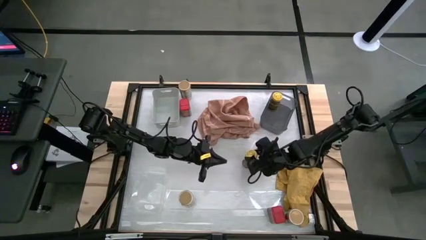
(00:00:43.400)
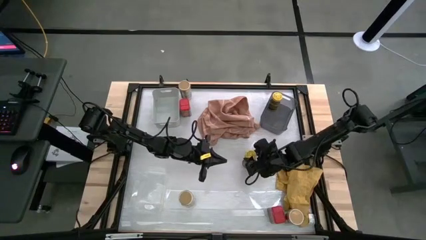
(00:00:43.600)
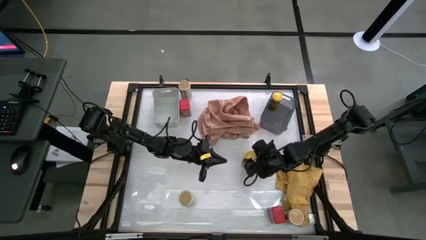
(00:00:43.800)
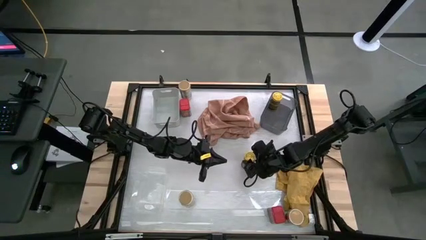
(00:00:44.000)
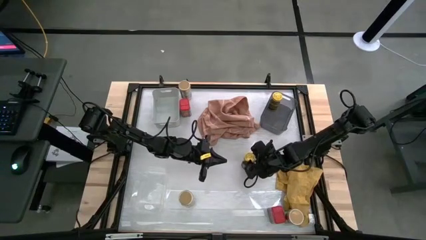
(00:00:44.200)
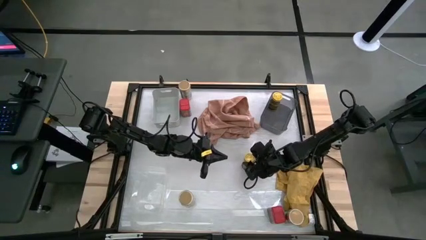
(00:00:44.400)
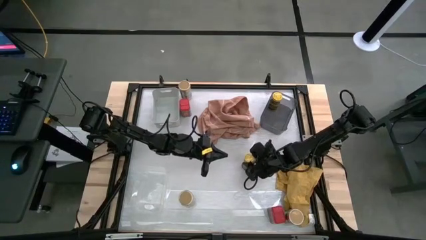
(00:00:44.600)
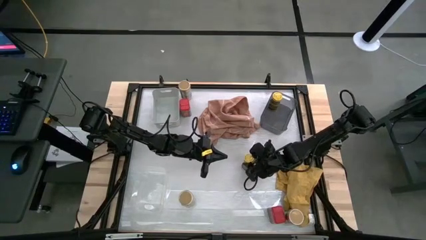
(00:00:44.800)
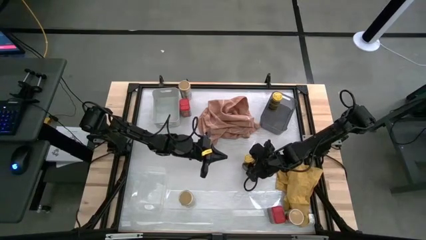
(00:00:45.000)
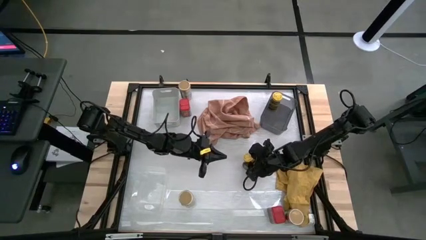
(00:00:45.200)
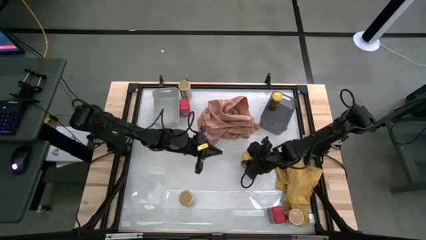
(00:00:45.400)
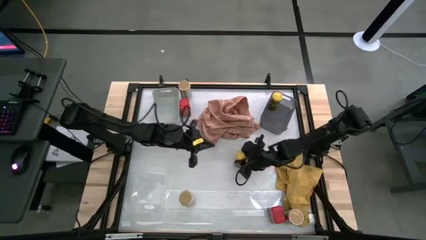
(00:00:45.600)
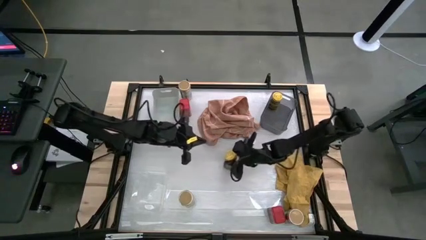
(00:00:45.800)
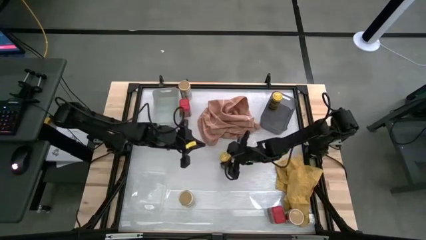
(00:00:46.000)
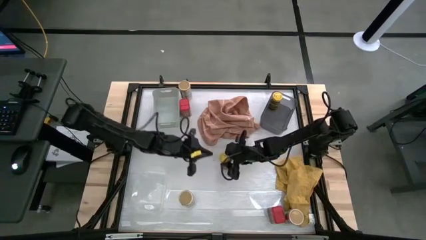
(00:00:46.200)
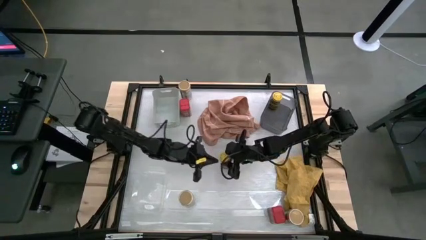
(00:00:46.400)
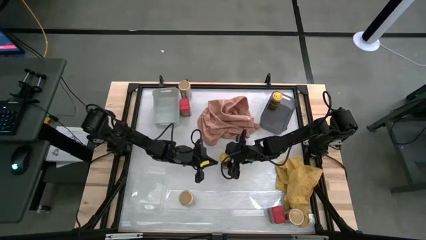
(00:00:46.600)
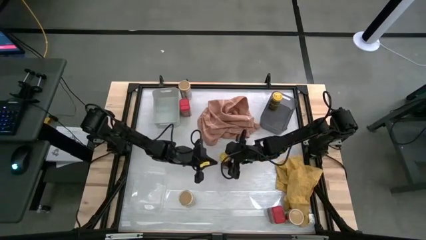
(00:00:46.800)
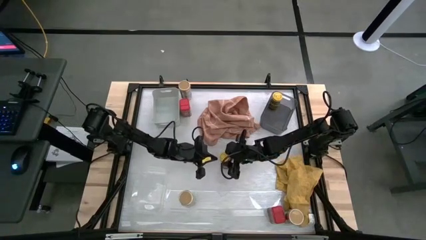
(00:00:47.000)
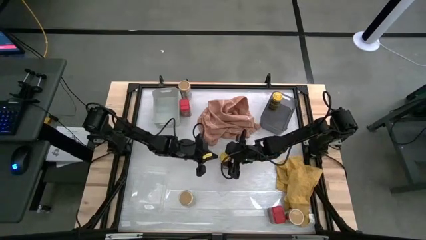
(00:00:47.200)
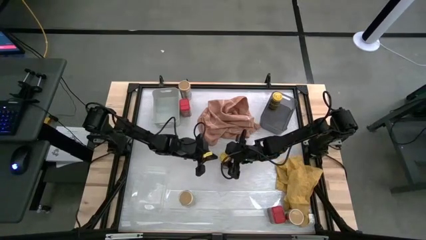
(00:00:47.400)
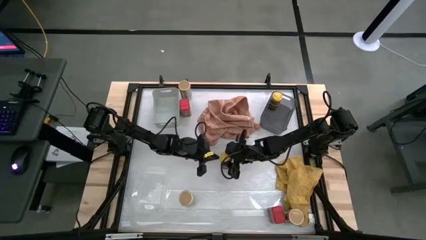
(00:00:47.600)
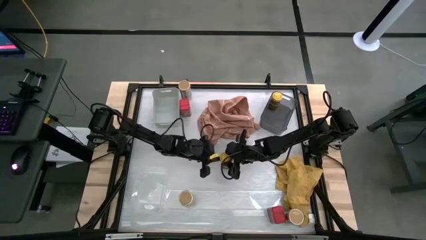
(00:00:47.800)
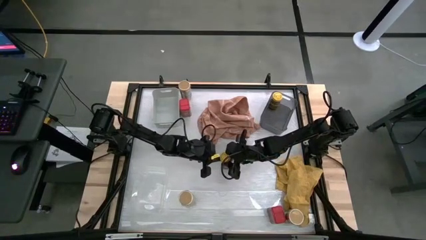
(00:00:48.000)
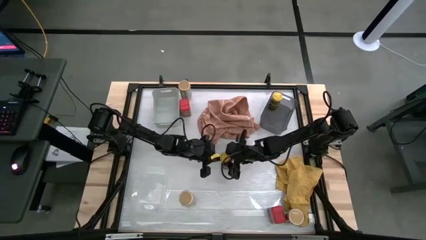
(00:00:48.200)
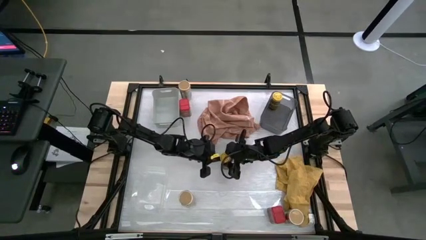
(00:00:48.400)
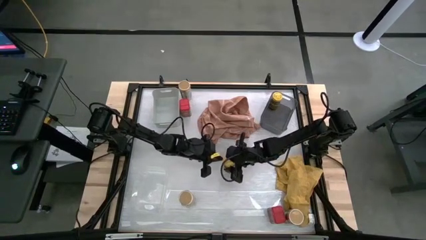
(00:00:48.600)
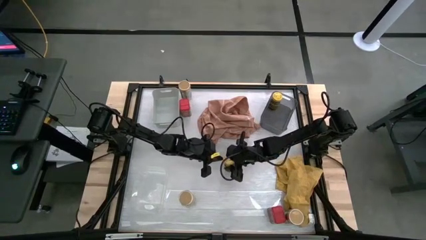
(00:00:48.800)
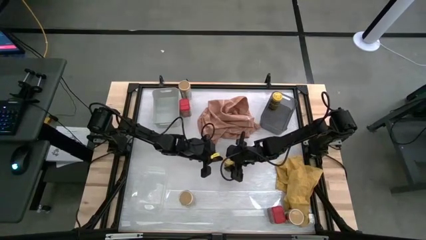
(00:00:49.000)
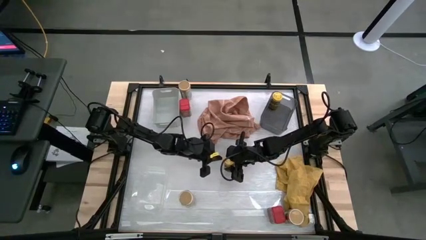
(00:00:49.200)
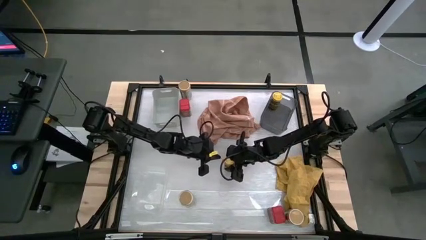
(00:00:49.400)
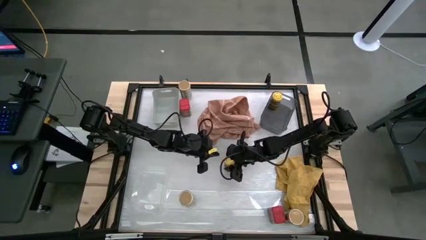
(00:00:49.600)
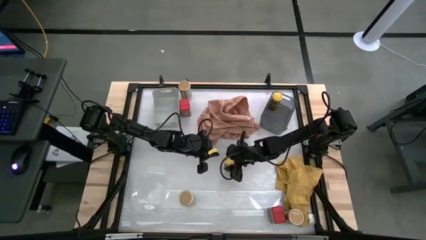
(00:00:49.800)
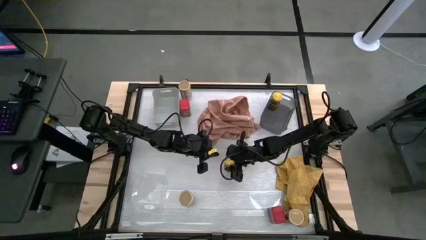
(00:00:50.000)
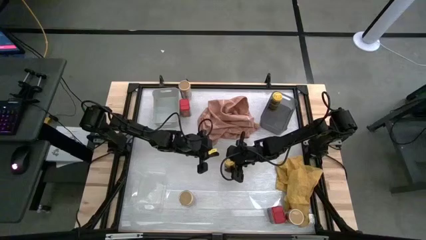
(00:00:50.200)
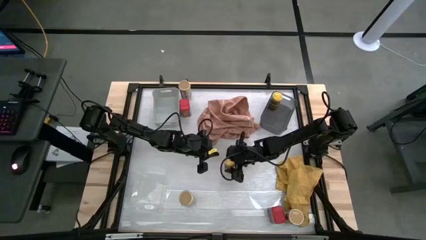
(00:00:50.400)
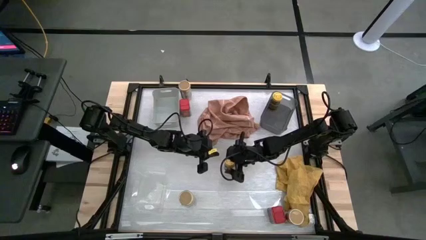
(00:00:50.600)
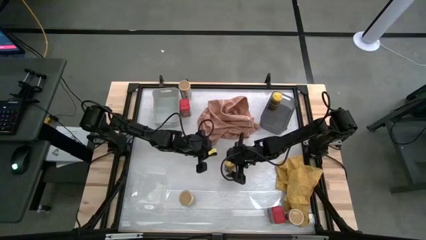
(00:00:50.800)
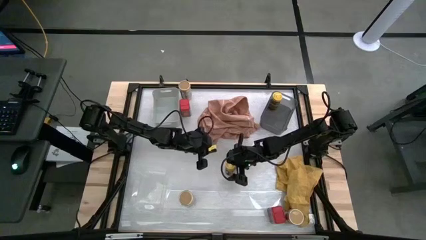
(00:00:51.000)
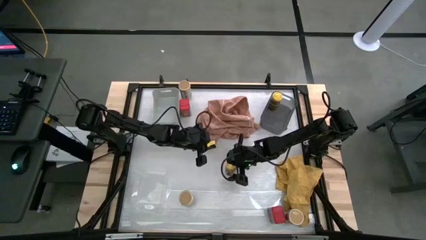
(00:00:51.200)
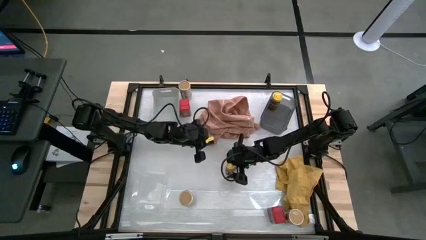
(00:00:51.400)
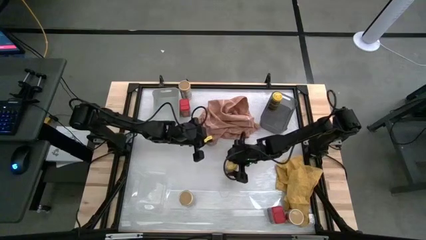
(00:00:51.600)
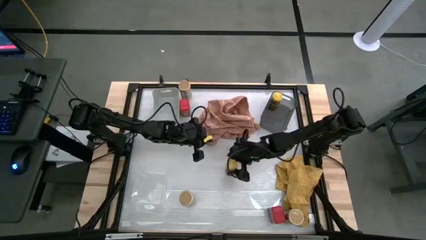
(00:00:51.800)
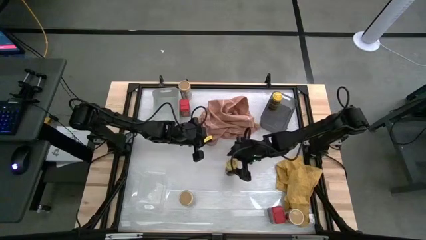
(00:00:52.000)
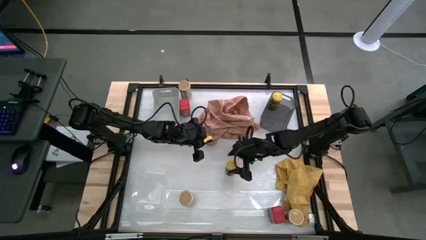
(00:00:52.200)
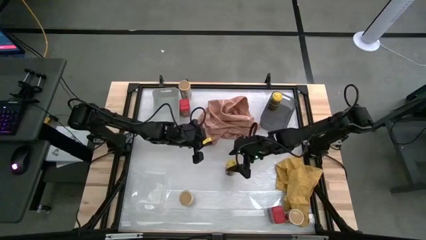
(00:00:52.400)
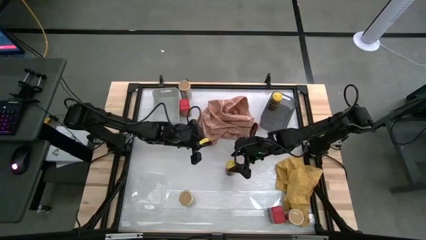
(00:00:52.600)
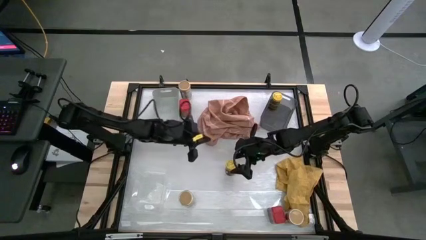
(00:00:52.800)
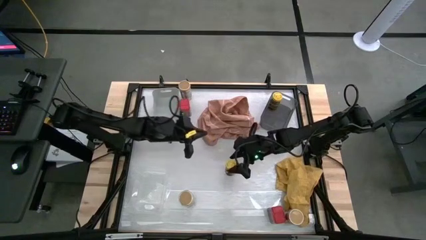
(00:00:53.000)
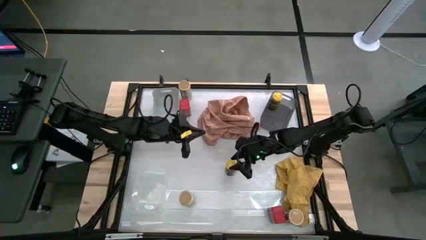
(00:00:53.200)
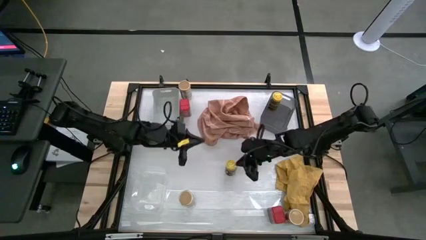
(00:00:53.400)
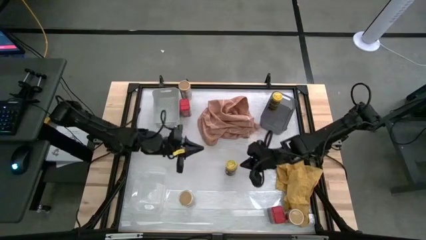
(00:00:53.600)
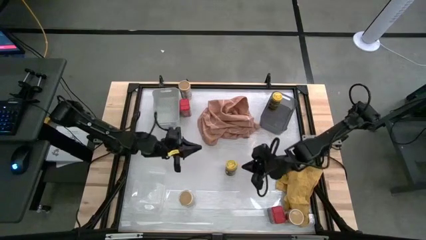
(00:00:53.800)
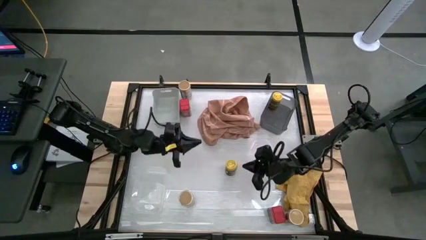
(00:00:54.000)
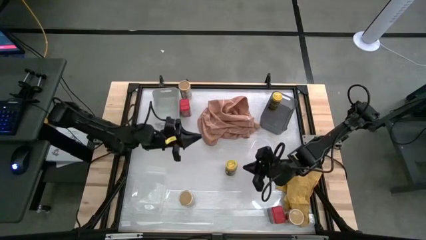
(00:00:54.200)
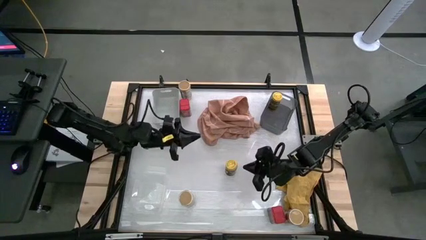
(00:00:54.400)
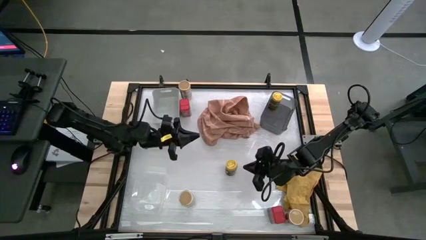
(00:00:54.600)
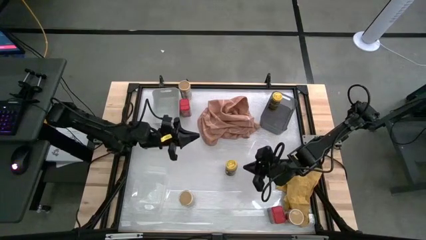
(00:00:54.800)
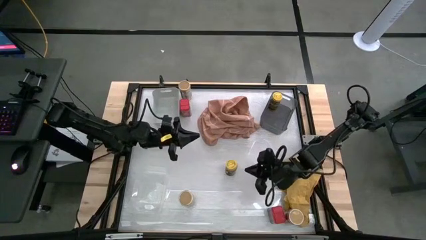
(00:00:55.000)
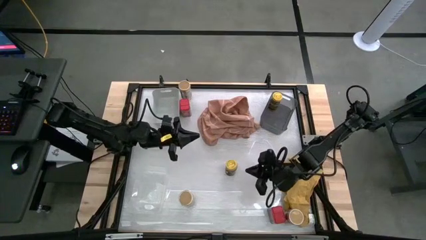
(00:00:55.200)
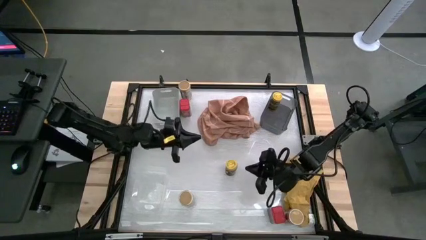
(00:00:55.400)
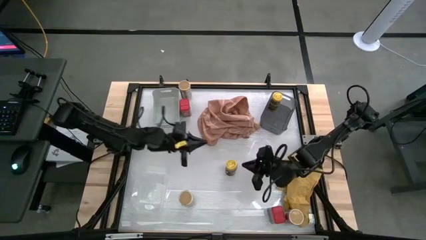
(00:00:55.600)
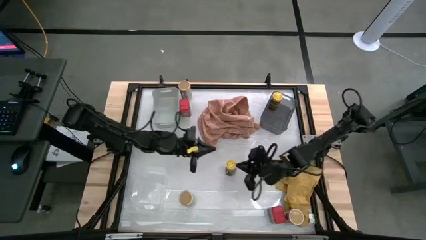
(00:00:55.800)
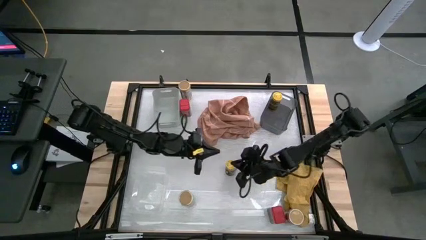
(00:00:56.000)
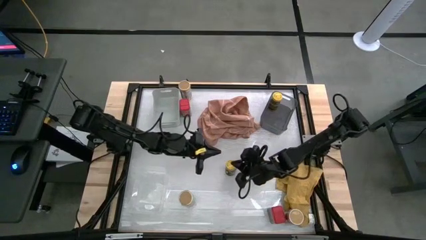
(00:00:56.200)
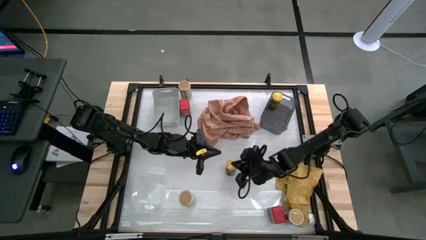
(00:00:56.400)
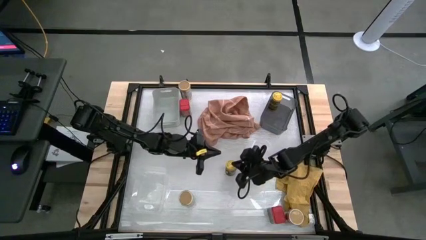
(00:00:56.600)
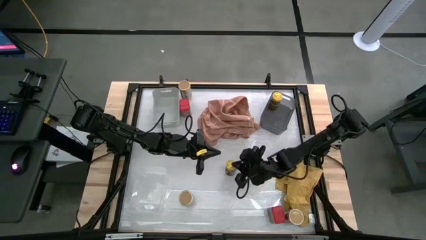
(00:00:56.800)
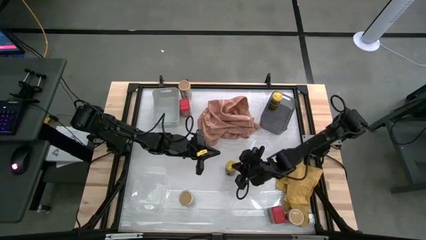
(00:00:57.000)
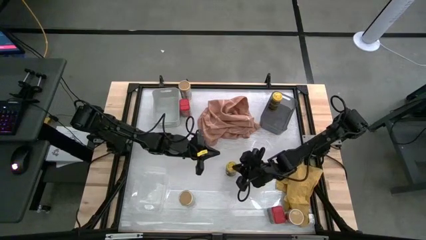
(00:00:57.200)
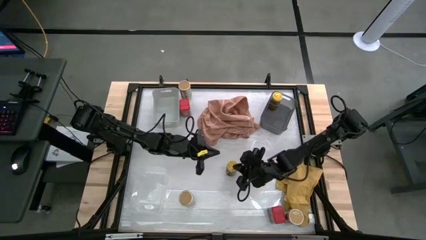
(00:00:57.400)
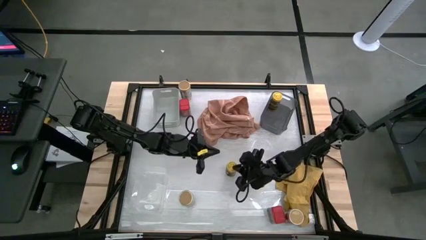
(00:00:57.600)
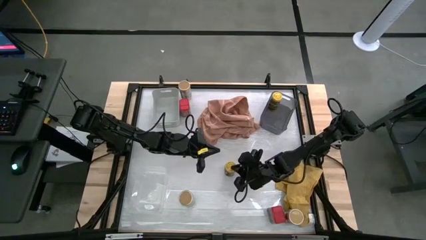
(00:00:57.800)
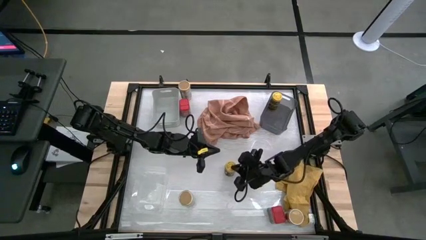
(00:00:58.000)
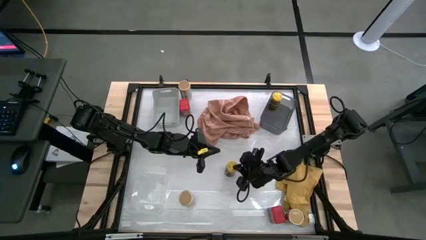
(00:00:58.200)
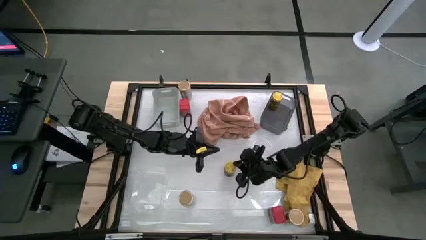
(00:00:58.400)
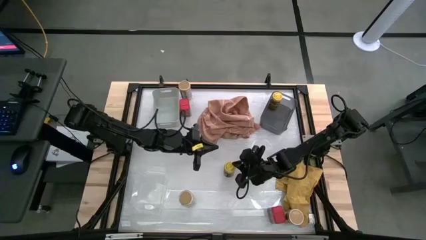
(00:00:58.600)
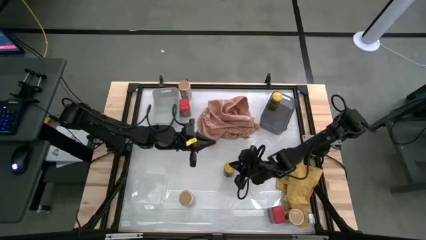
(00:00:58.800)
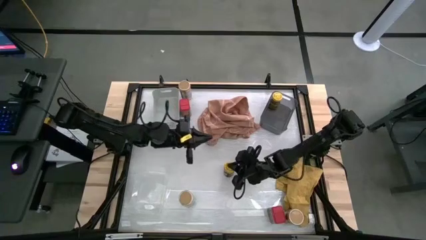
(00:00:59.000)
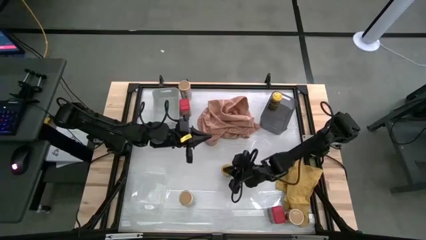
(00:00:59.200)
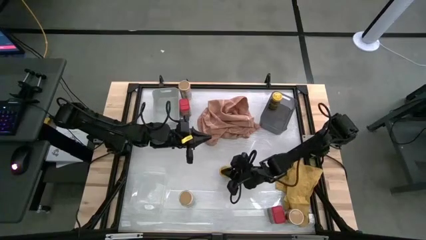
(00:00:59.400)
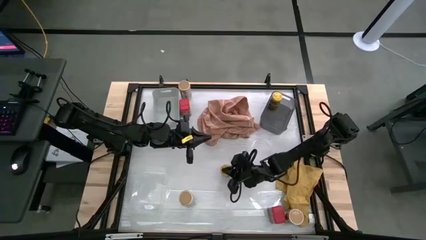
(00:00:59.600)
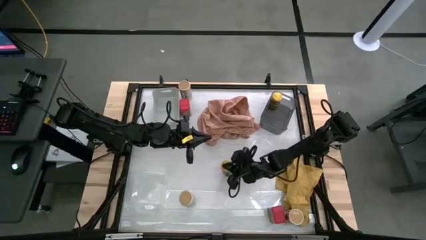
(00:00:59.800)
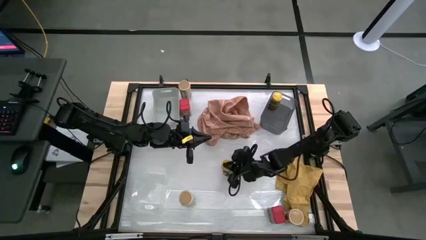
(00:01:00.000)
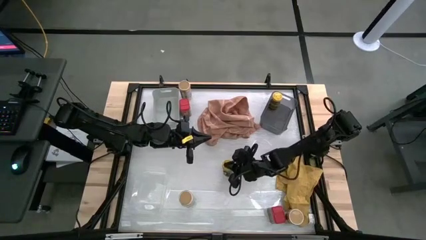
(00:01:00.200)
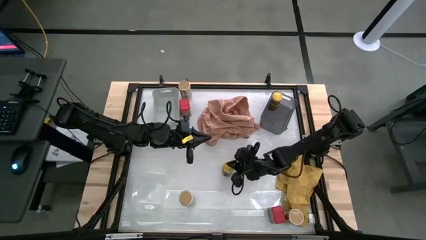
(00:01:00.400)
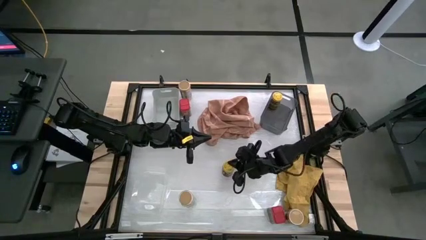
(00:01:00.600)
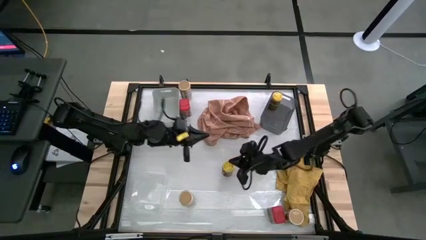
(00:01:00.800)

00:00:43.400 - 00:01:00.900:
Task: Sort spices by type
Put the yellow seasoning bottle into the black bin
